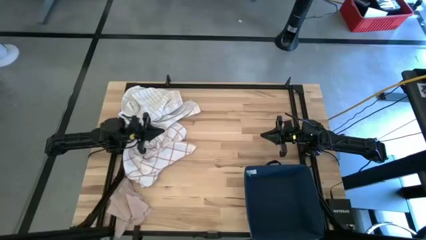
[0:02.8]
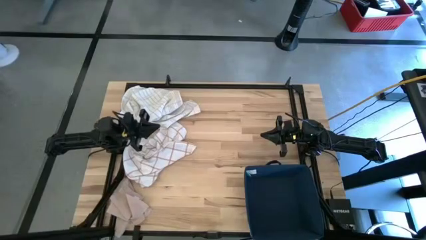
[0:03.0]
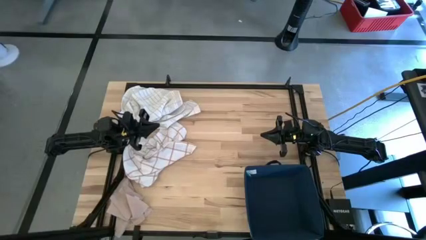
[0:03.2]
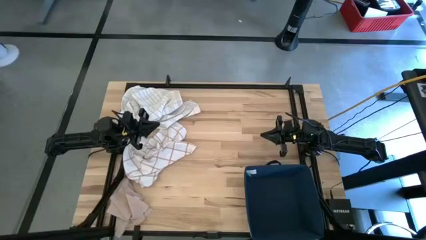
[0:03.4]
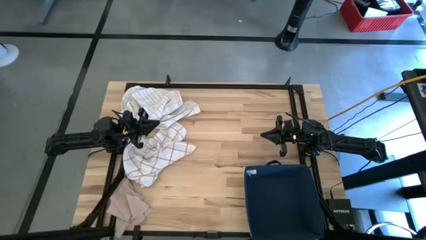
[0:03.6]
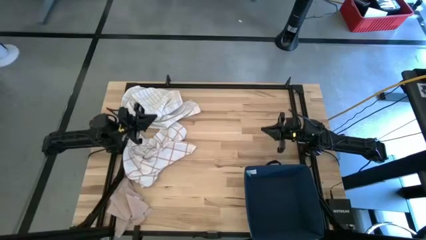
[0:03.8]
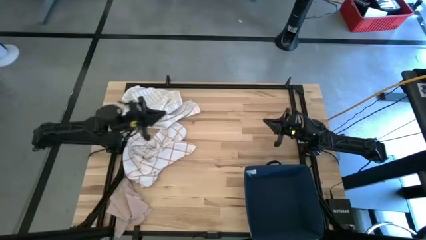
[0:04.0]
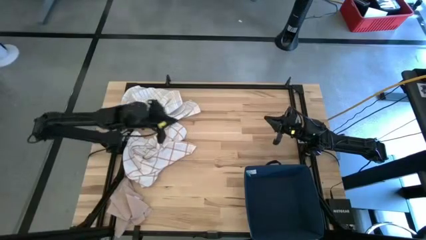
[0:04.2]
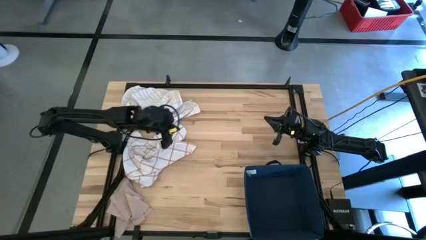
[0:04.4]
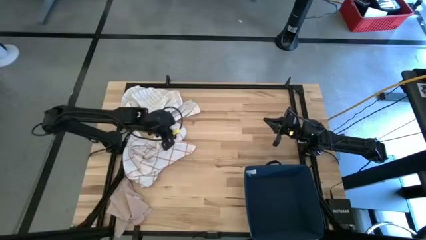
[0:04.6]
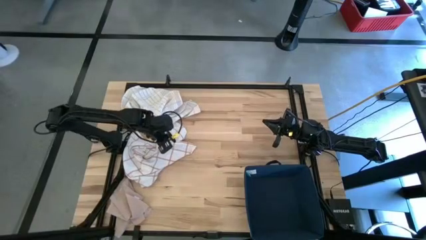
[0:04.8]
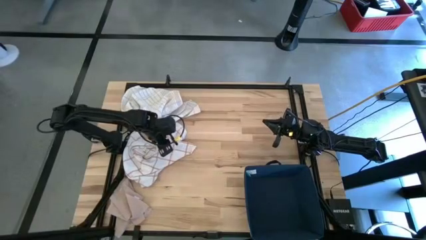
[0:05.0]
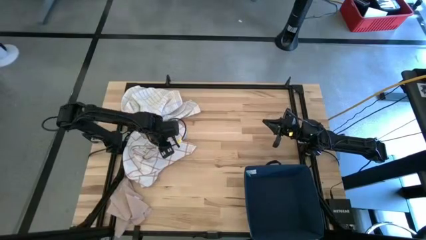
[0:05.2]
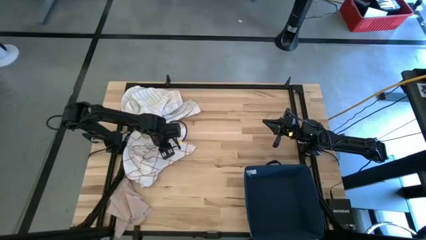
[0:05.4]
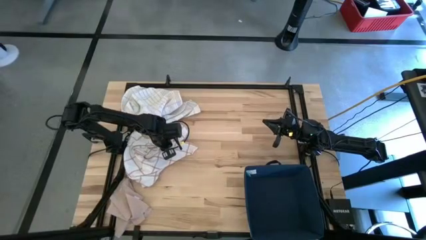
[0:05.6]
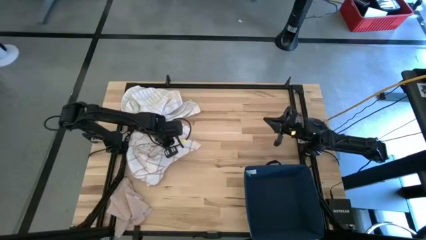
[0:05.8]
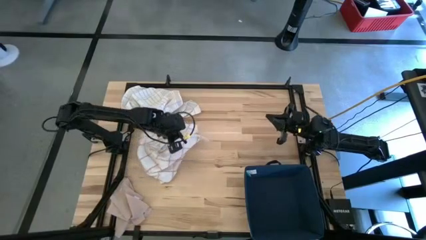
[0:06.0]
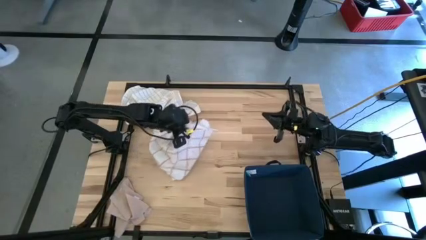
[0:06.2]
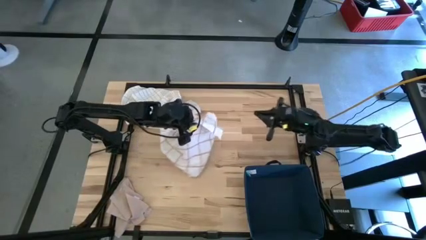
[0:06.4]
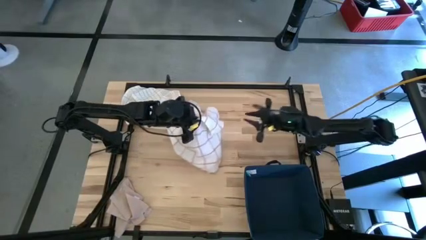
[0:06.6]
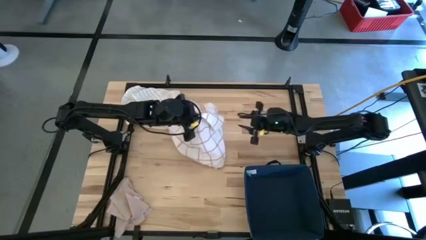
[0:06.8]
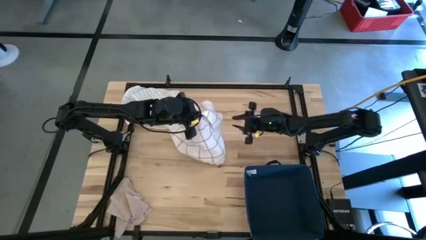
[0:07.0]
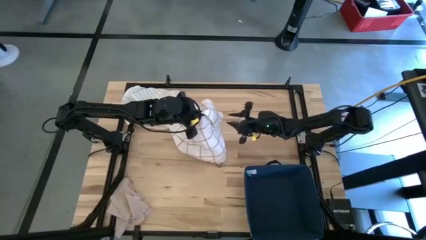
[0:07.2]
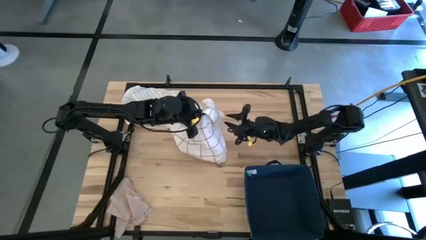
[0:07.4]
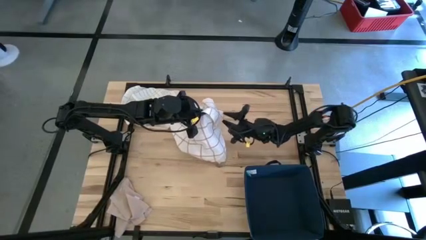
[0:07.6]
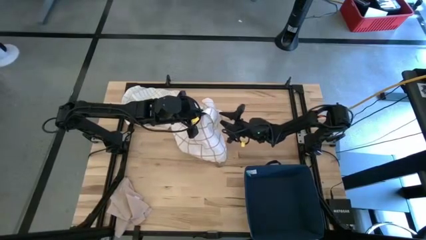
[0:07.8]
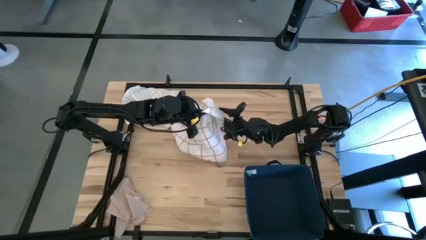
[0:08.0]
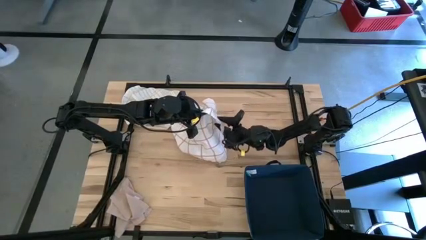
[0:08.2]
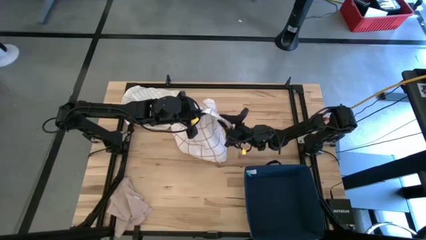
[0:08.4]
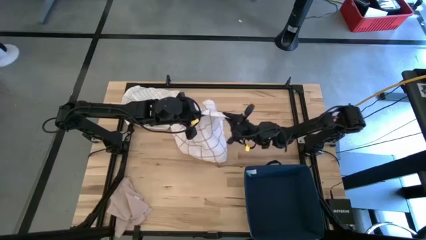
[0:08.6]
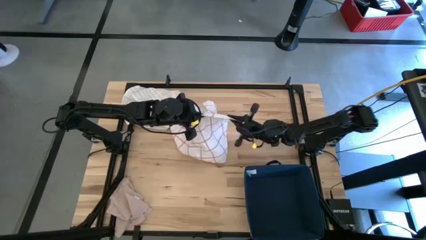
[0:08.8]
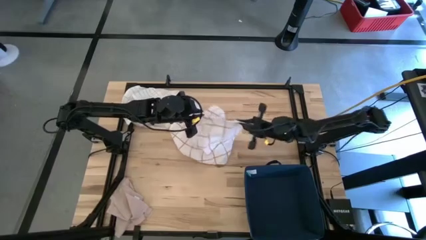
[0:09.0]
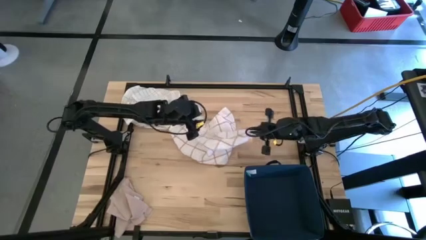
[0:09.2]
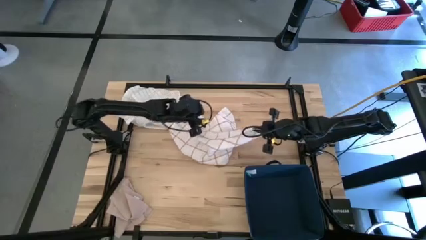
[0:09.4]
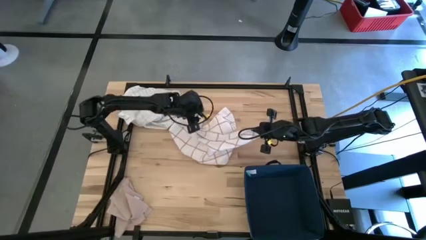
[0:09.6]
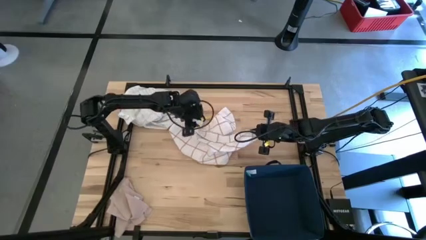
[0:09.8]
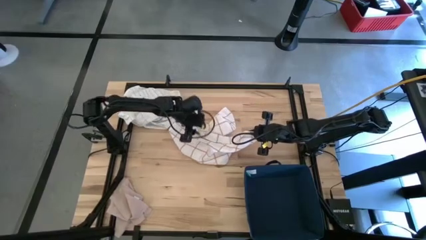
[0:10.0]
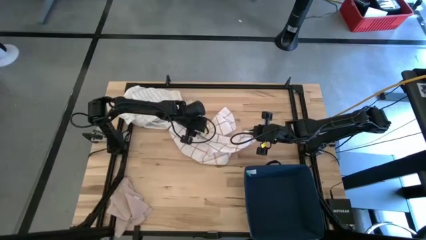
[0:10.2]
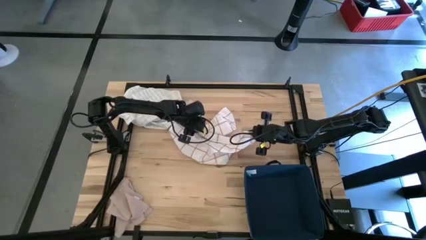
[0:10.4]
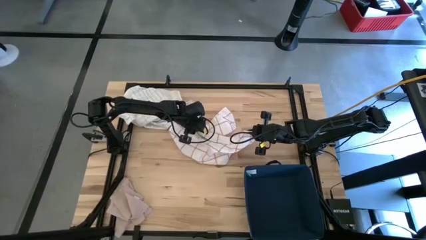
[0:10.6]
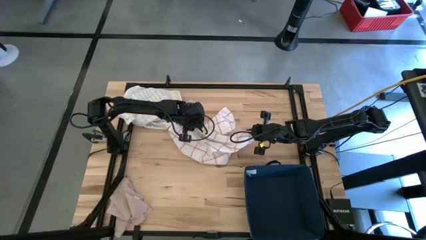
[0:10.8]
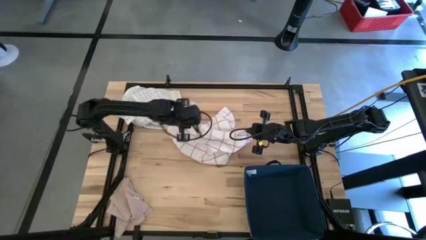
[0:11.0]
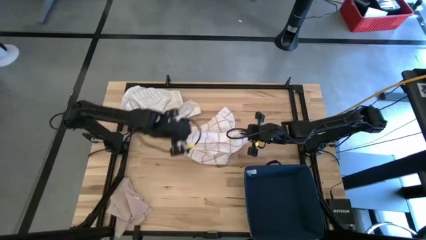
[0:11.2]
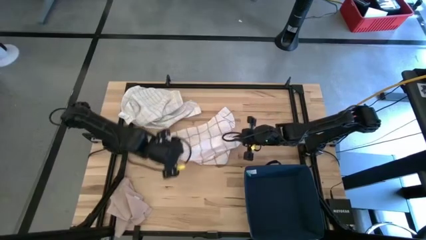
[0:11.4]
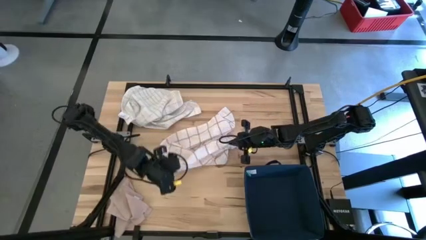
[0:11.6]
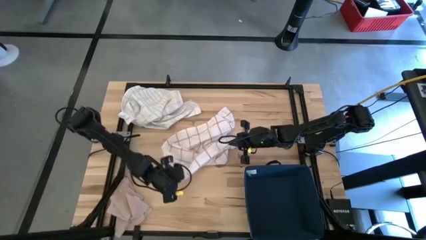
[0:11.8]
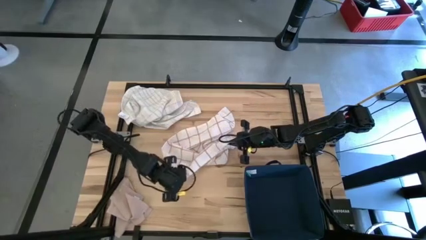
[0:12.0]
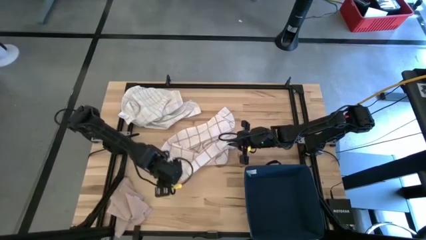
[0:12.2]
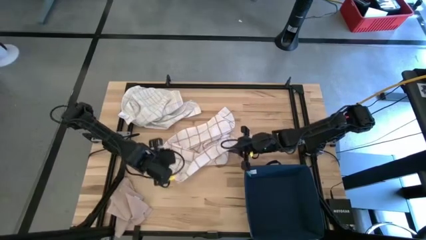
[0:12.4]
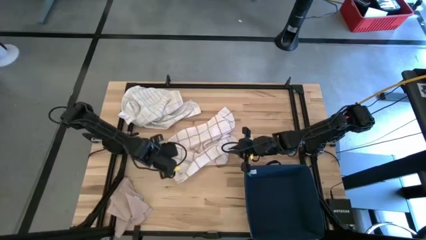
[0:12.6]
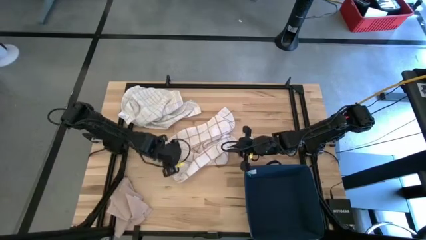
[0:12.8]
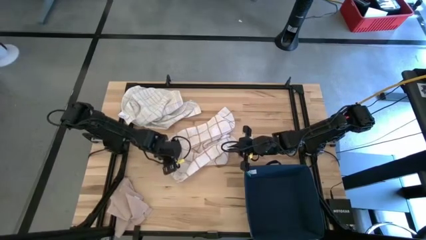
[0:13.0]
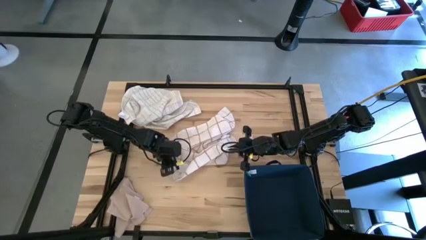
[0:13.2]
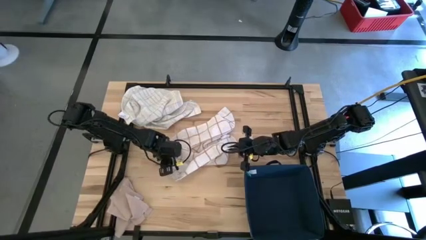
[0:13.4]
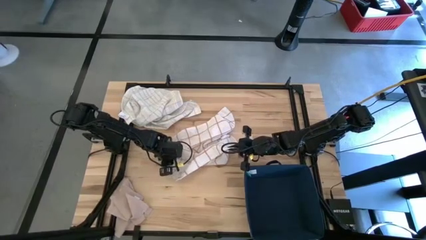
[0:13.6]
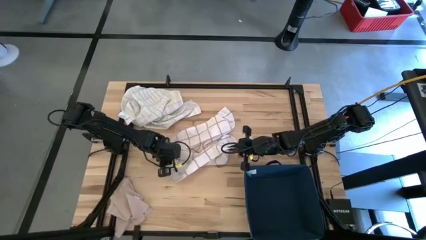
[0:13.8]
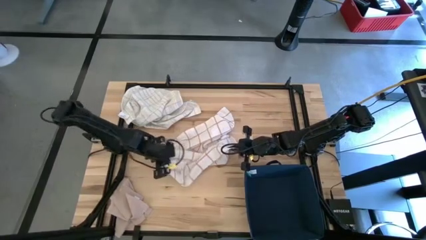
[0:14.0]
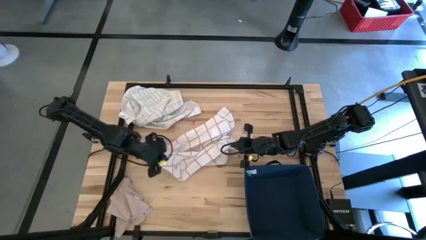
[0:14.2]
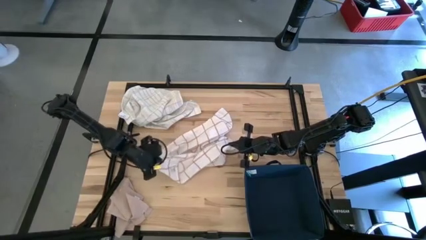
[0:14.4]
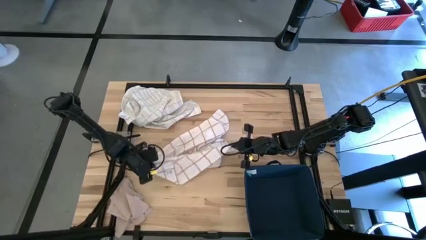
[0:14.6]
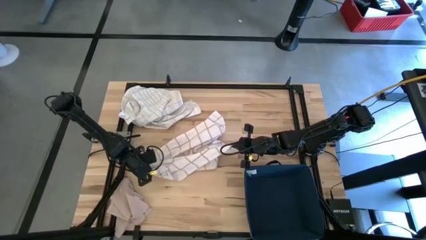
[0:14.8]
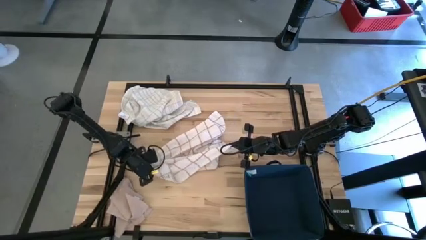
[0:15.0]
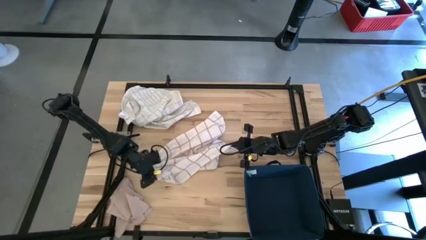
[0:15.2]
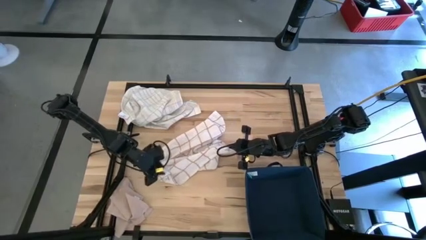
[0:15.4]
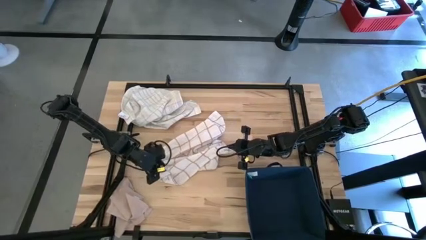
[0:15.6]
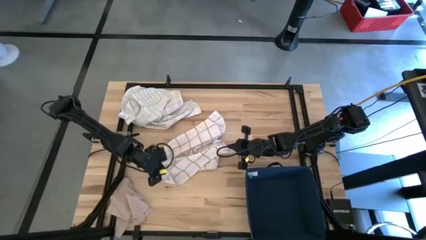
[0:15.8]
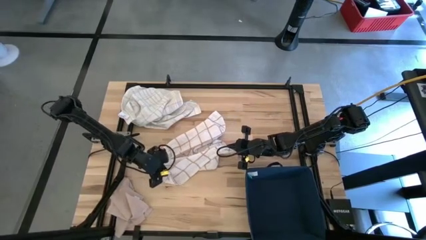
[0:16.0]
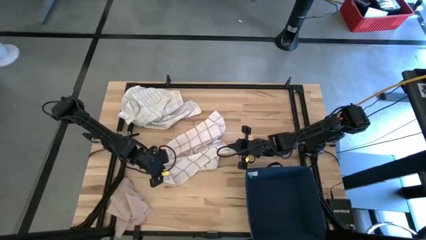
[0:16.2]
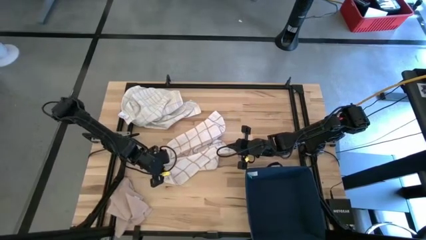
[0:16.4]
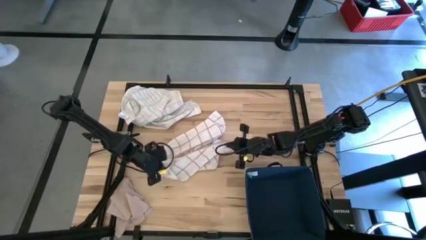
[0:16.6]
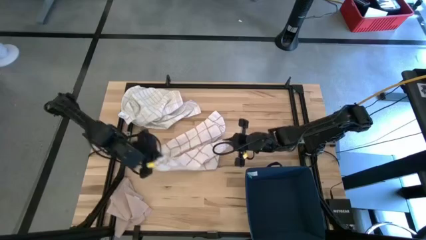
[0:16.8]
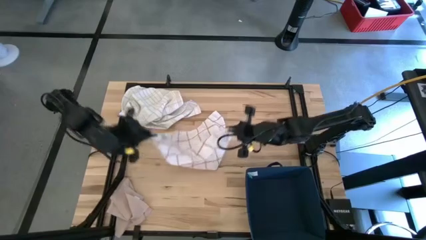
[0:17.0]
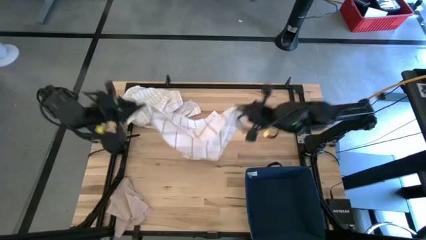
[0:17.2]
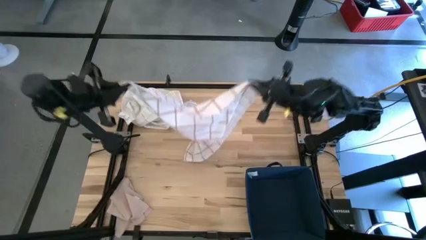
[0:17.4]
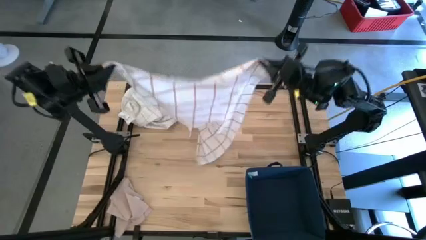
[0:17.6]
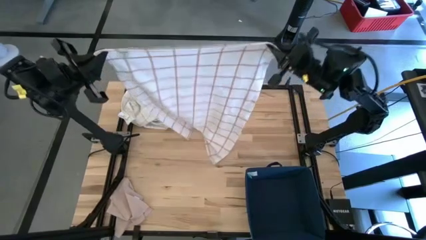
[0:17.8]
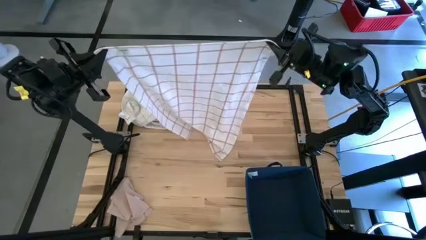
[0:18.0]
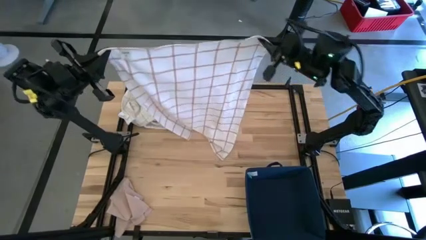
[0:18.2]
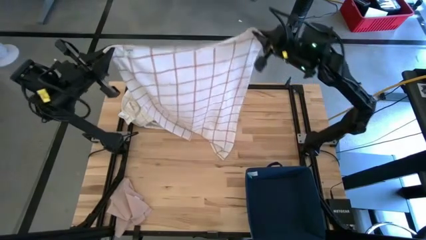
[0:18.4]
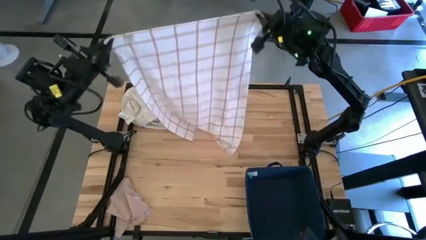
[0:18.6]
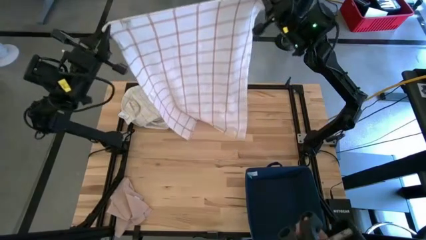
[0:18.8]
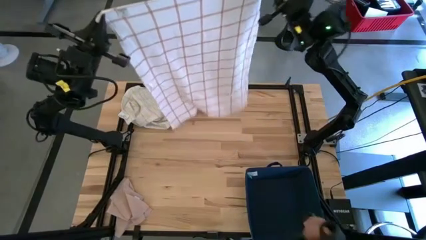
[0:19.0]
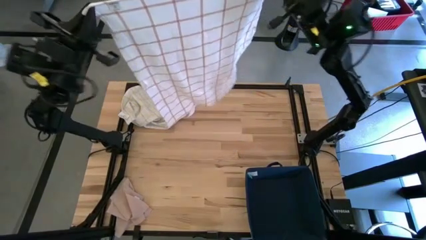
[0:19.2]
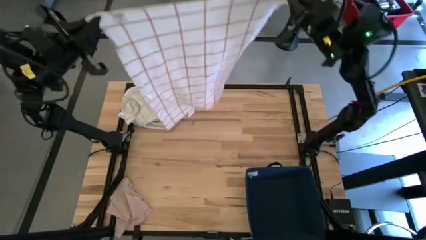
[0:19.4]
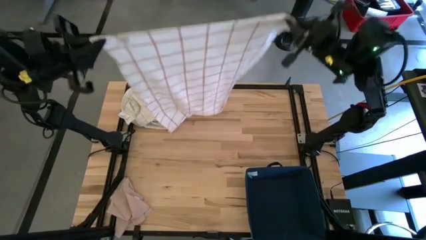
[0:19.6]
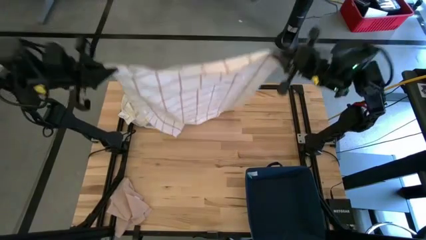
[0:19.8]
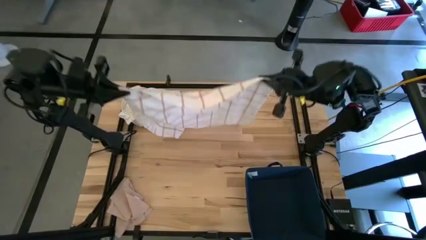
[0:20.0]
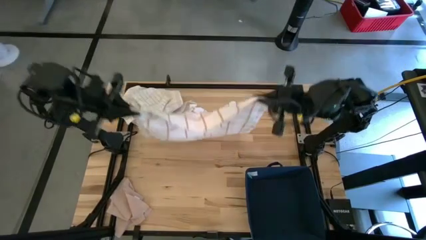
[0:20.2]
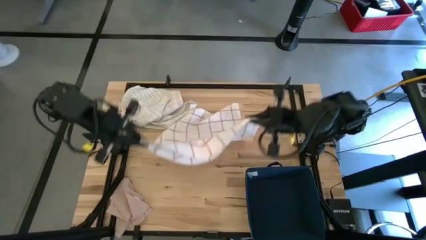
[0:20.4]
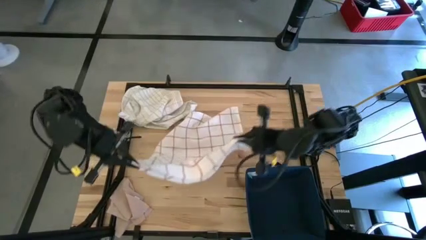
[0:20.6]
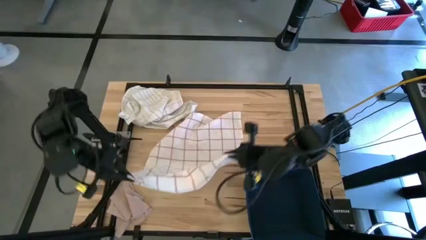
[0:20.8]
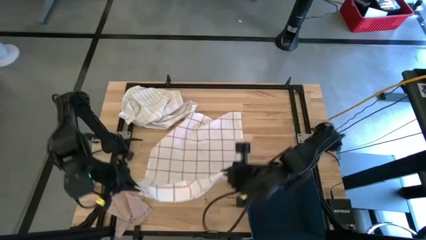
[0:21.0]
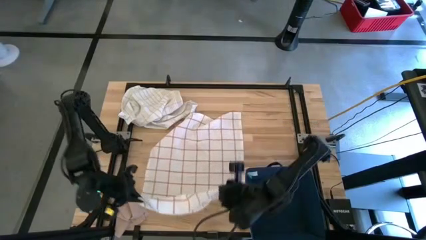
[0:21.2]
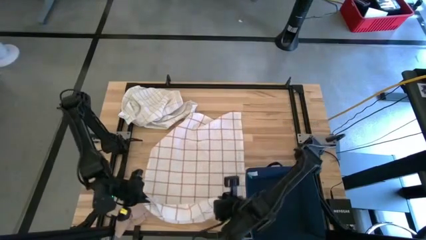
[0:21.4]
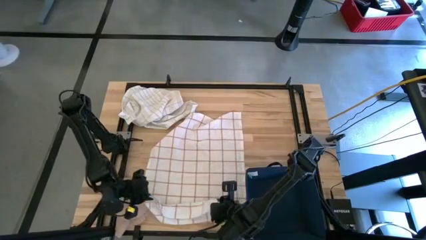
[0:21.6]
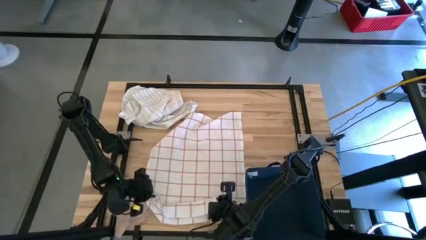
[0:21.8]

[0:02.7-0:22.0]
Task: Fold towel
Fold the white patterned towel
